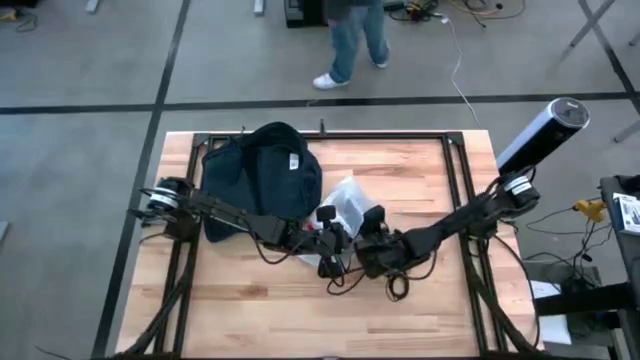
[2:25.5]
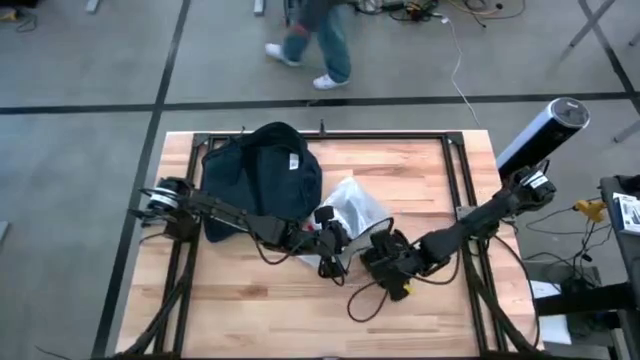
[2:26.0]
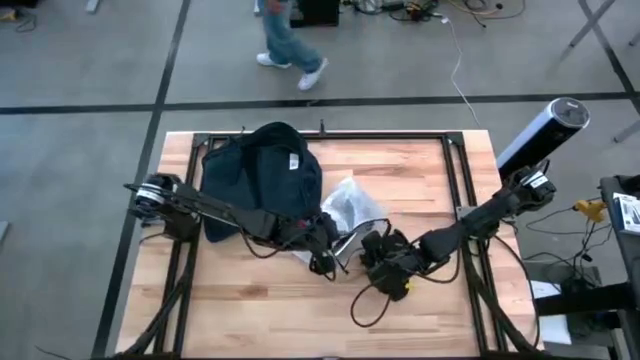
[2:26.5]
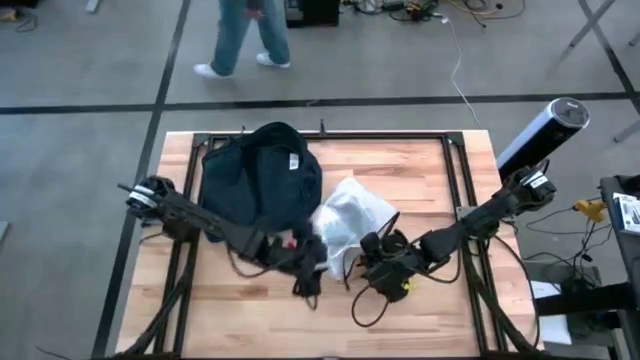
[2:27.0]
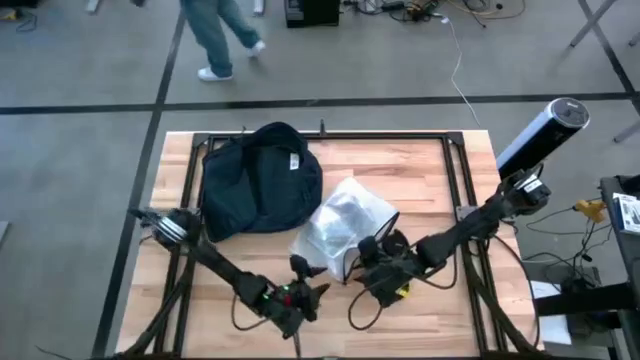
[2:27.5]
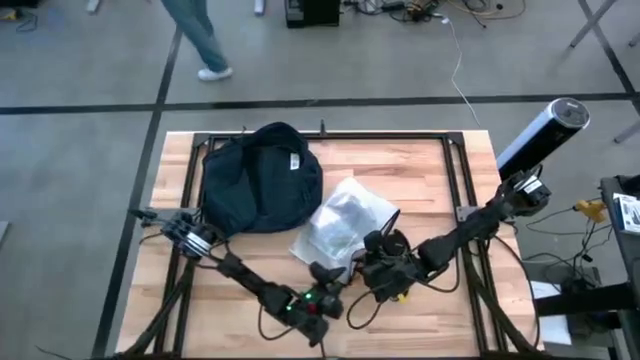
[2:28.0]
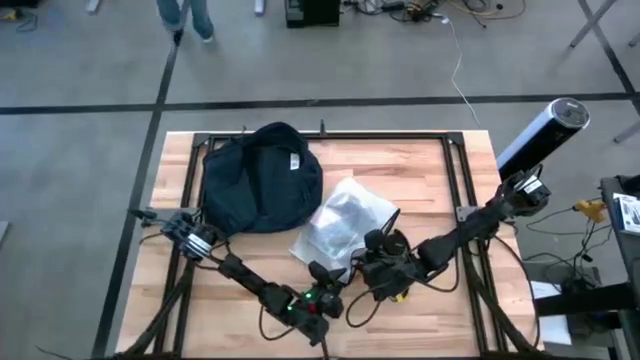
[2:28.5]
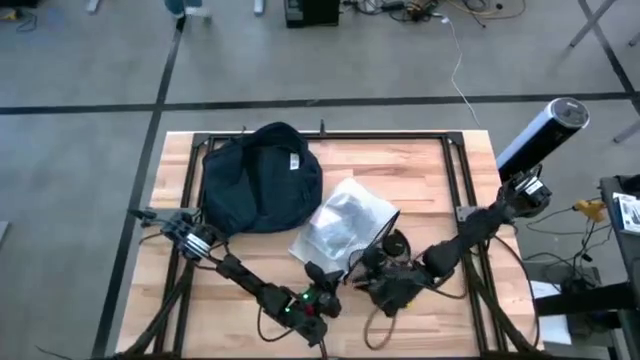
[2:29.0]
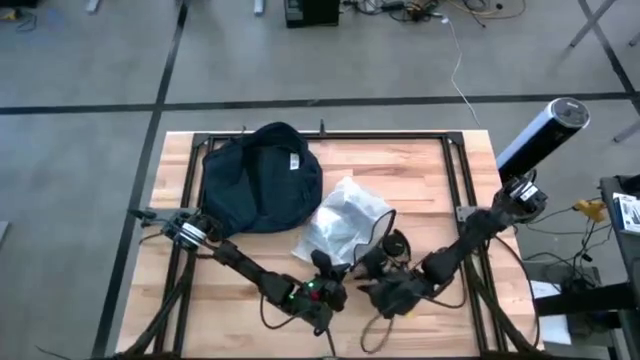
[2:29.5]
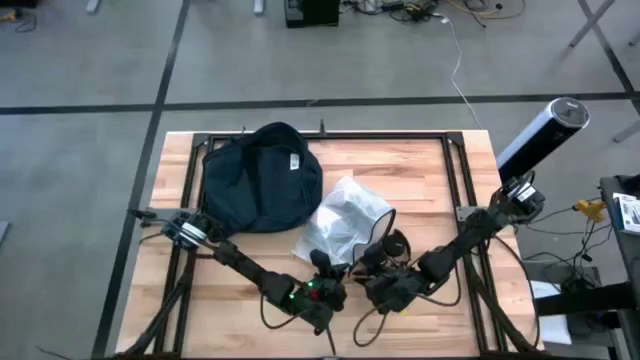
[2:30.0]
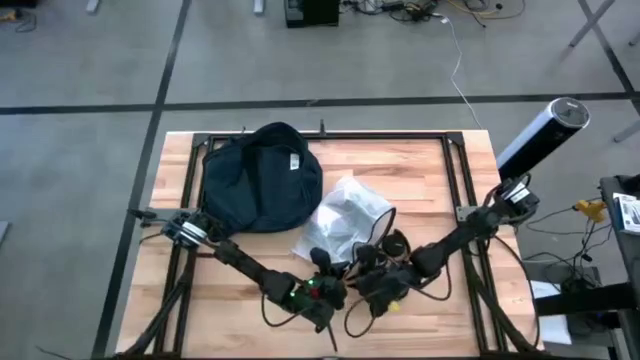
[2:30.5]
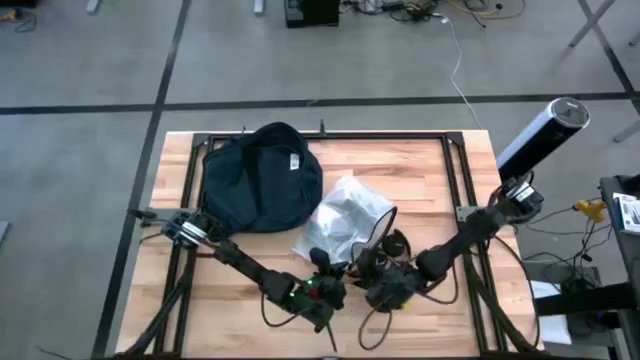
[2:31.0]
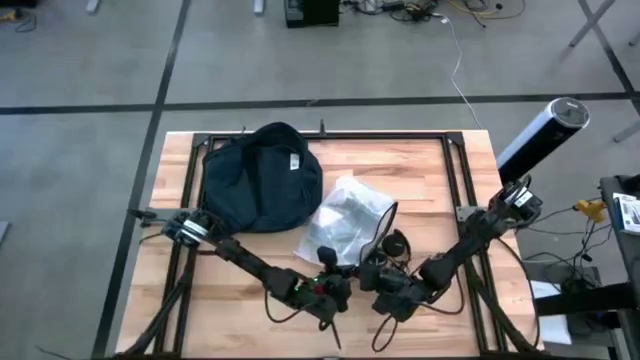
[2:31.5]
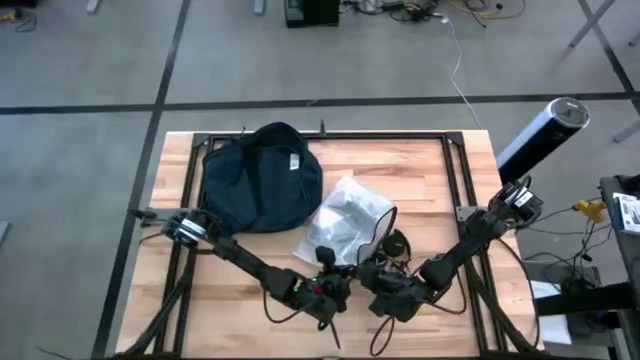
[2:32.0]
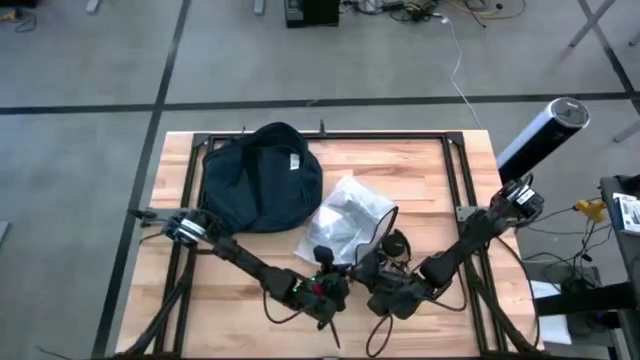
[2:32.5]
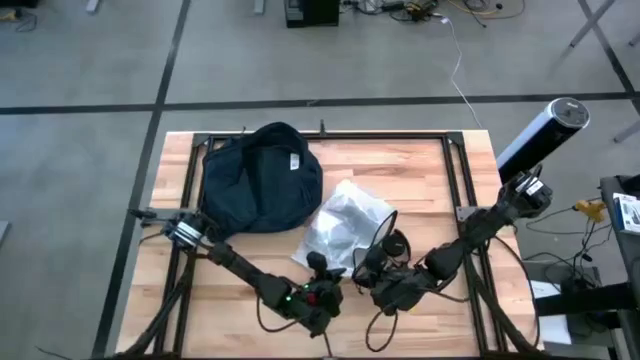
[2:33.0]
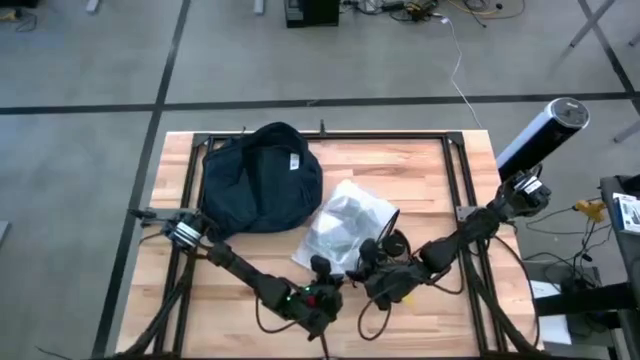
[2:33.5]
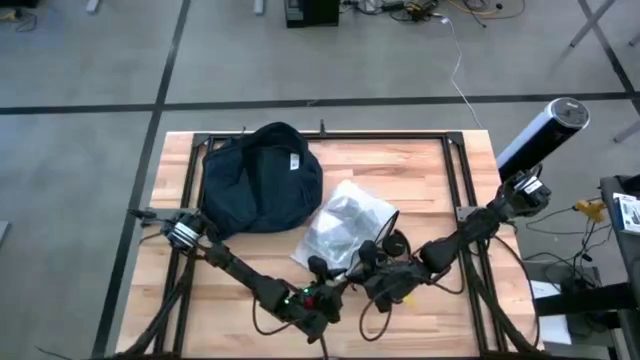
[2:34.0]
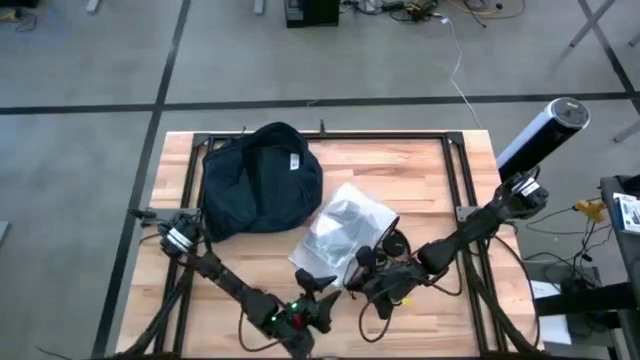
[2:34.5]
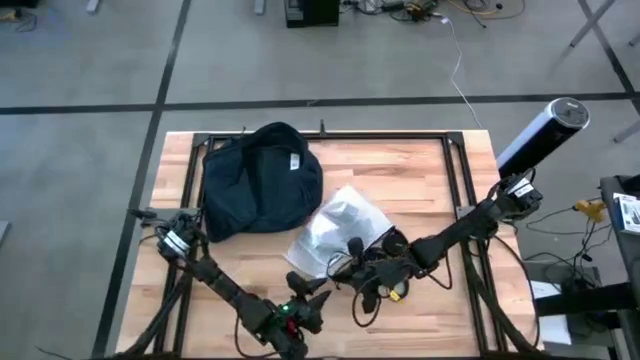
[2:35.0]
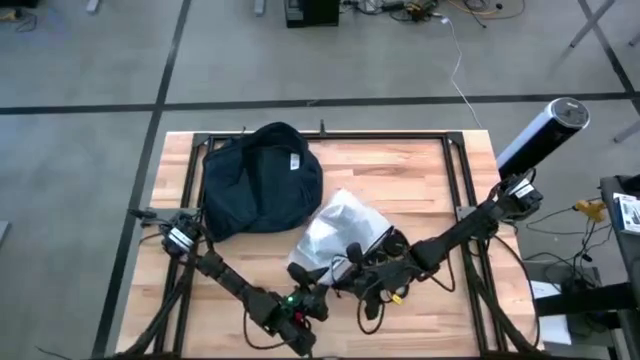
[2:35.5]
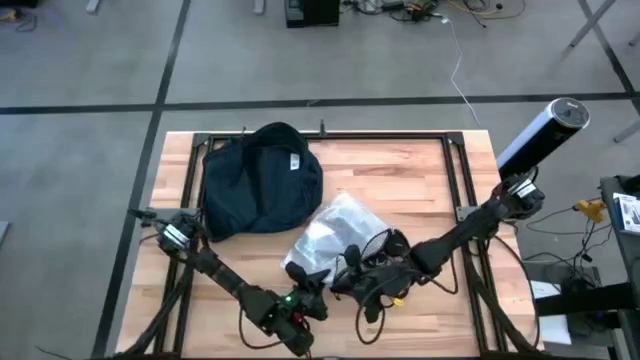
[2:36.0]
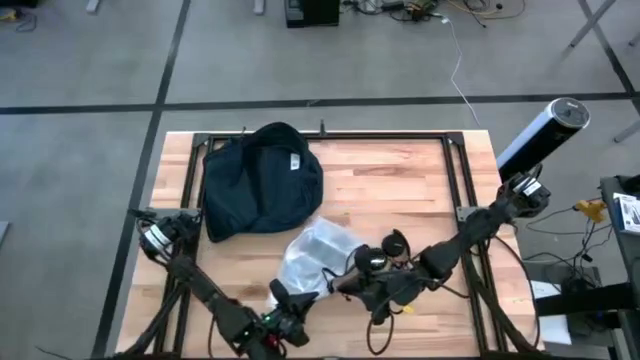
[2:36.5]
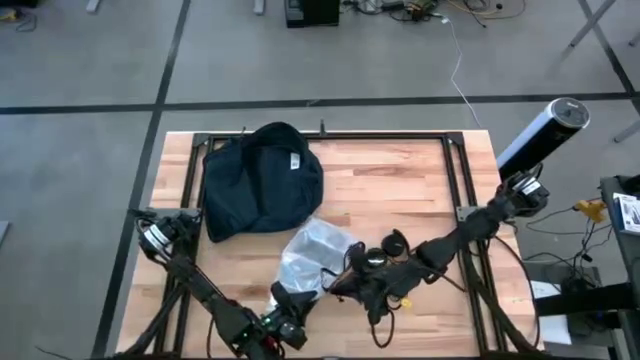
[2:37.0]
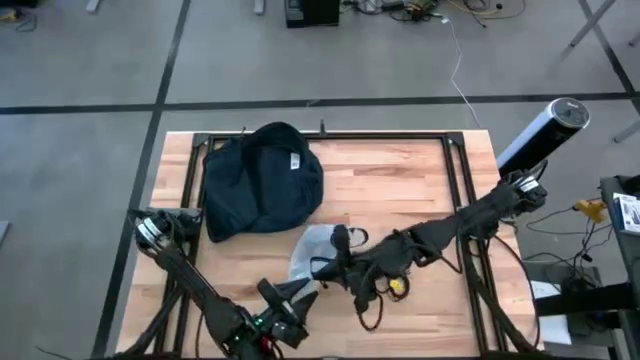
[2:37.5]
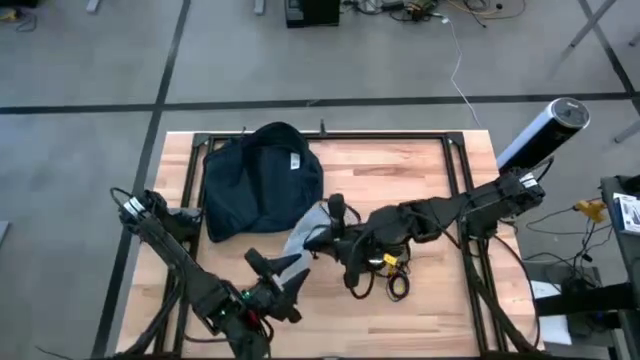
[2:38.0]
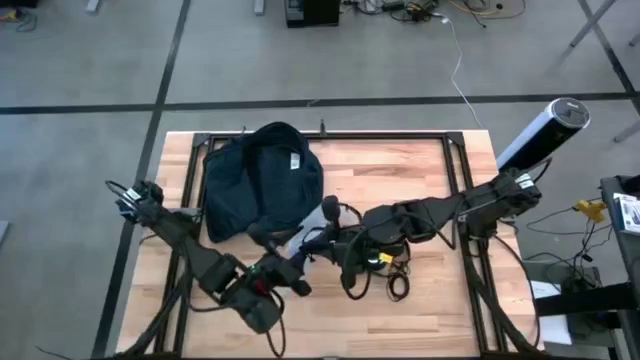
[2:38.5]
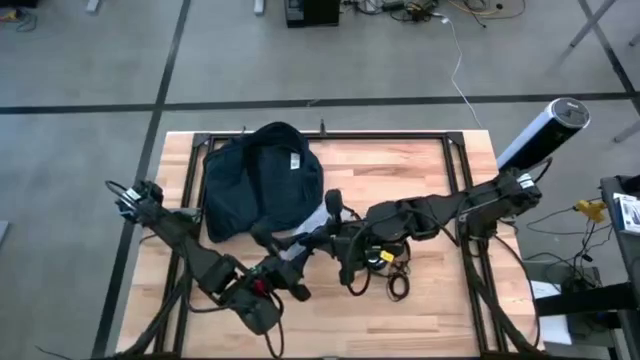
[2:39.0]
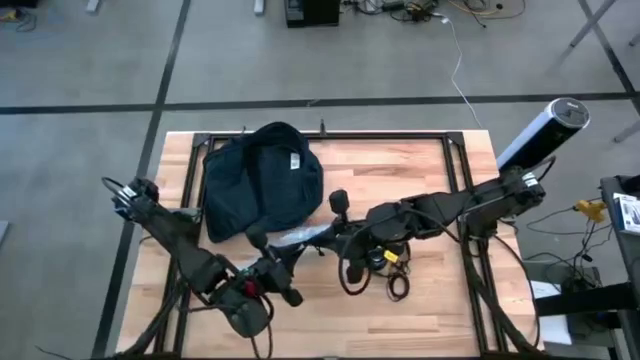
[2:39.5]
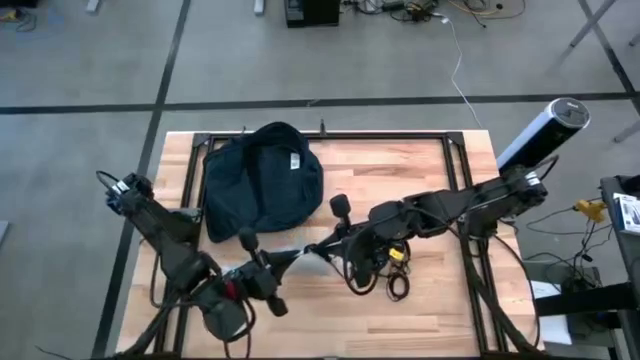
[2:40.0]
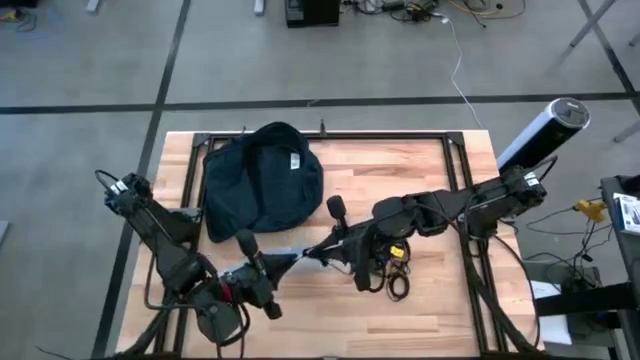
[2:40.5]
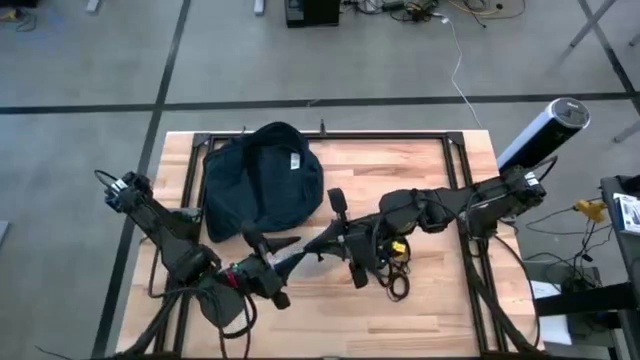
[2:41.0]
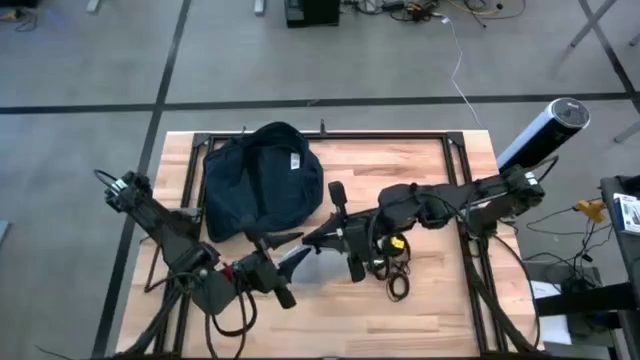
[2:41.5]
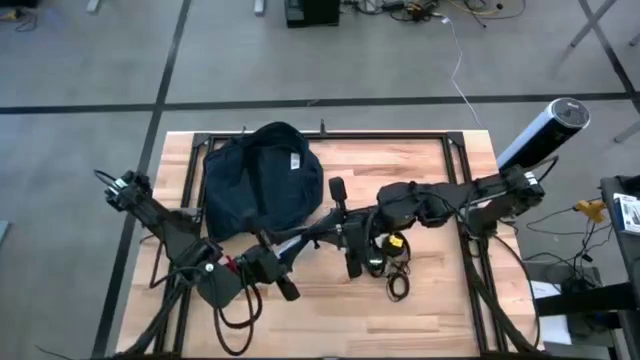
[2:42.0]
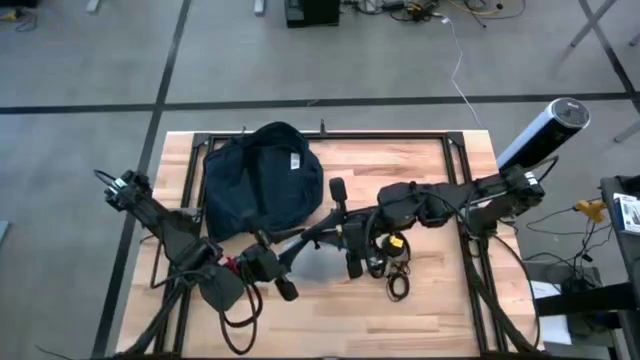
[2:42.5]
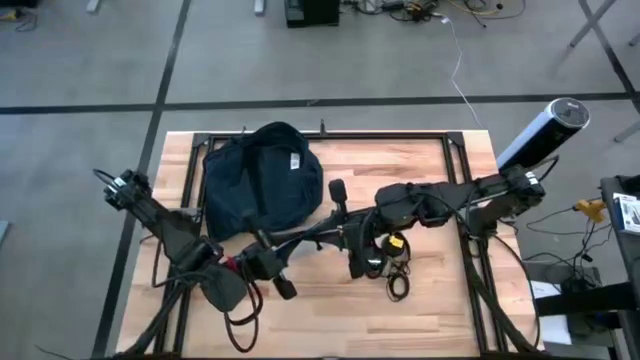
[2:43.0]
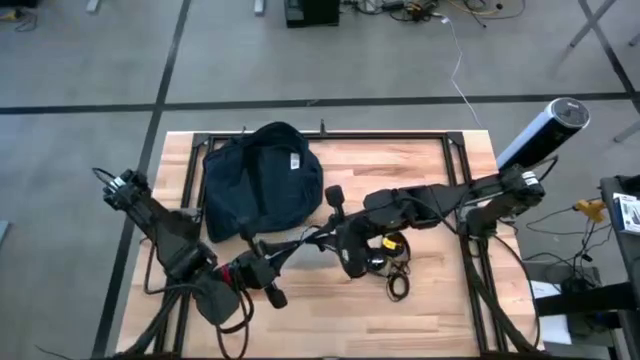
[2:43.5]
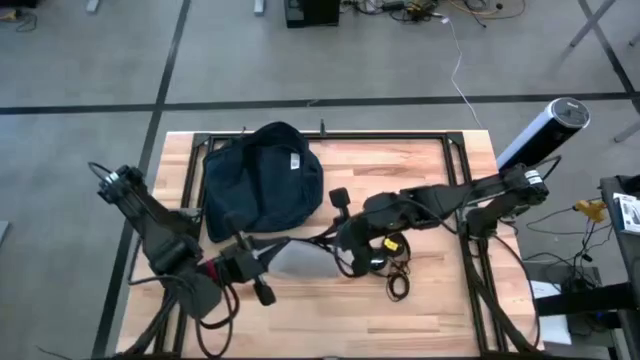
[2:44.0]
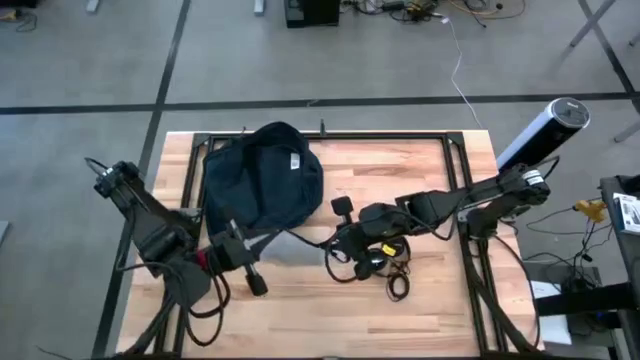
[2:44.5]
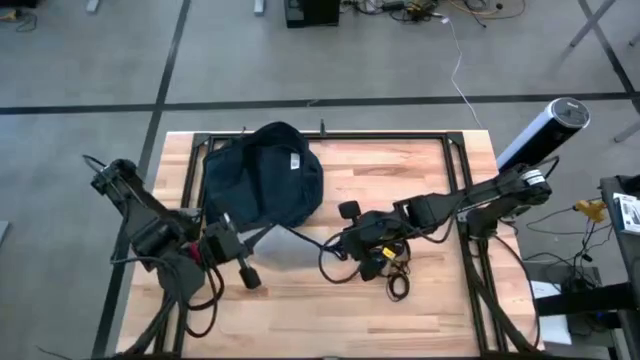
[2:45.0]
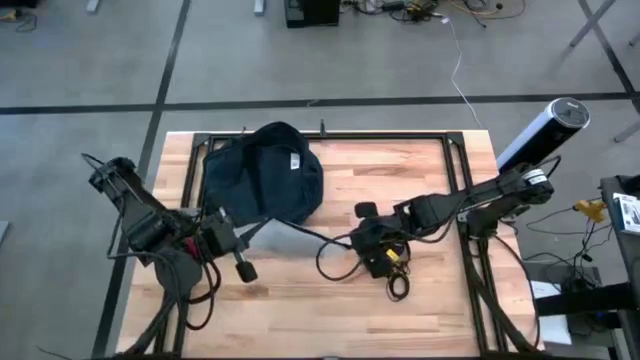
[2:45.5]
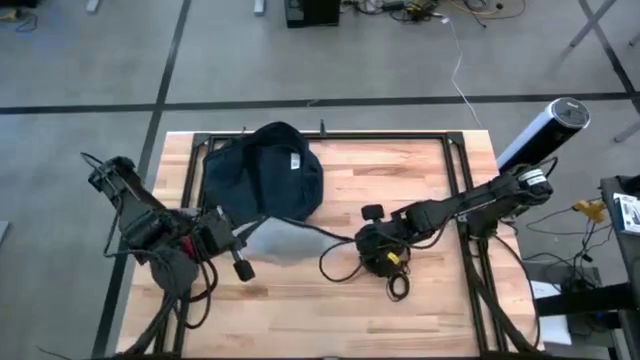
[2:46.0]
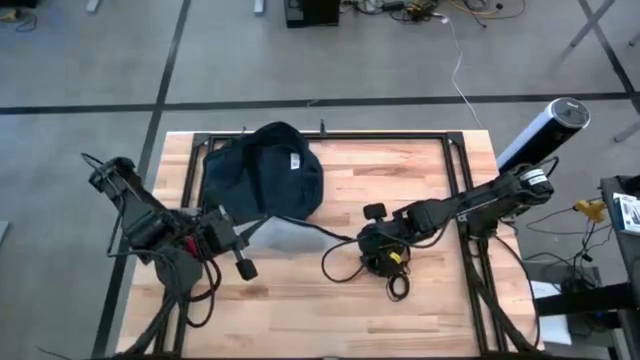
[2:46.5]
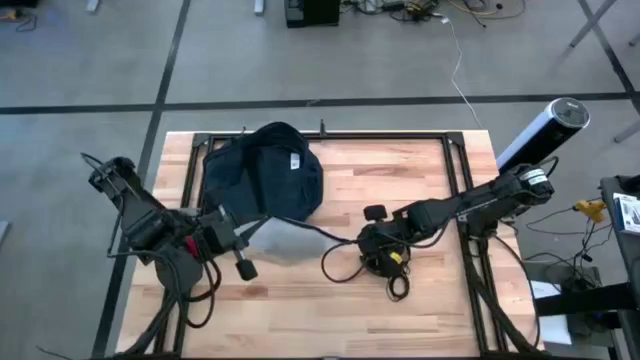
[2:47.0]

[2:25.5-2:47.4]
Task: Unpack backpack
Close the white zipper pouch

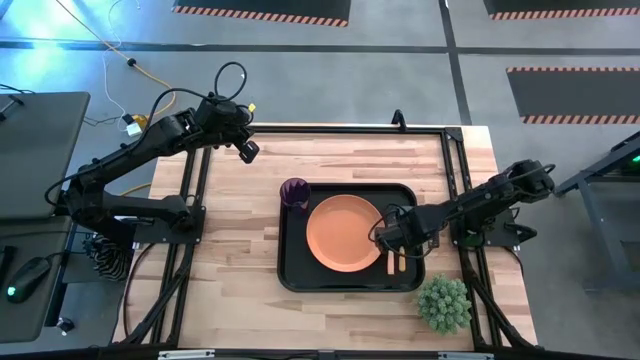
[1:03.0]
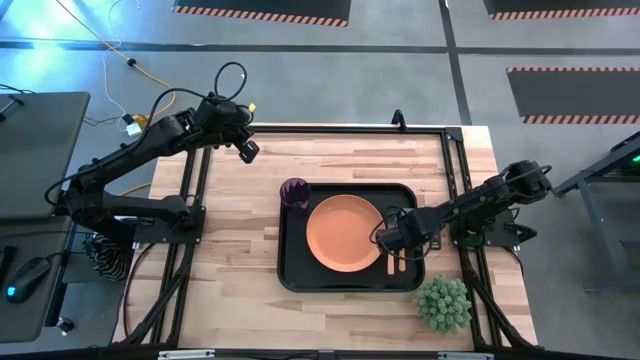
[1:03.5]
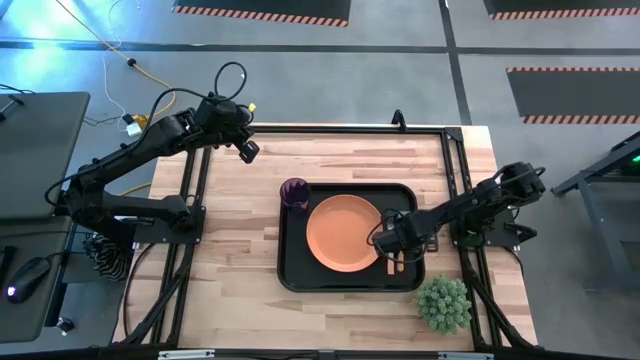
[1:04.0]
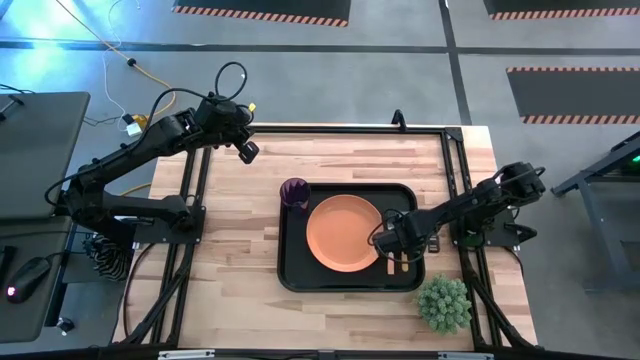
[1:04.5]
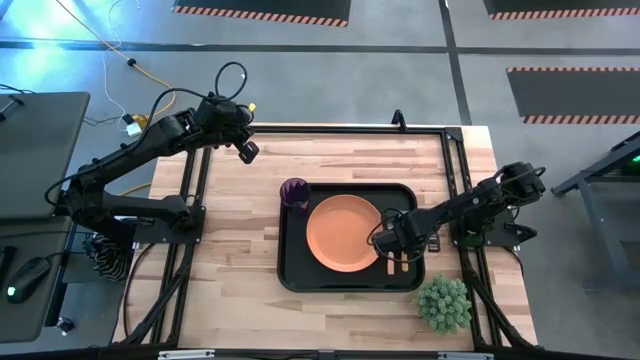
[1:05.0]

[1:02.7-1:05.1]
Task: Pick and place plate/cup/fork/spoon on tray
Adjust the orange spoon
